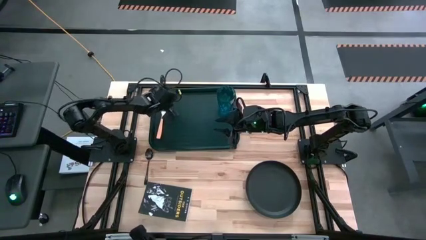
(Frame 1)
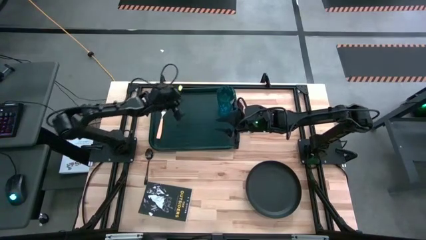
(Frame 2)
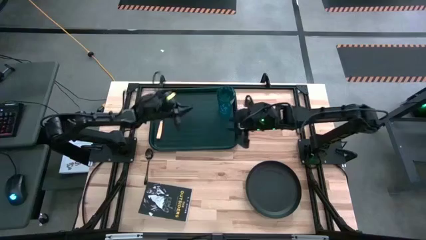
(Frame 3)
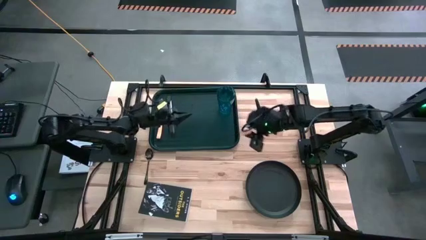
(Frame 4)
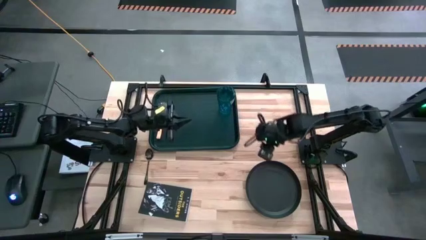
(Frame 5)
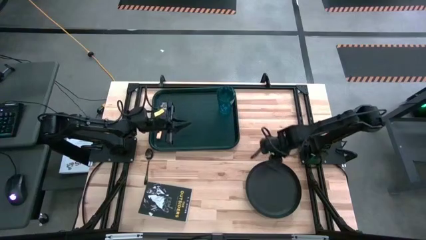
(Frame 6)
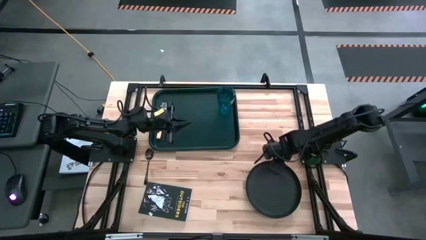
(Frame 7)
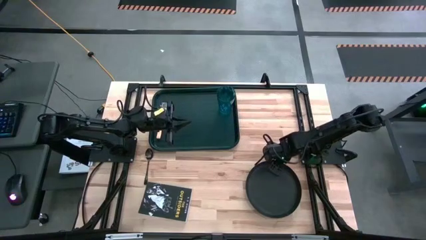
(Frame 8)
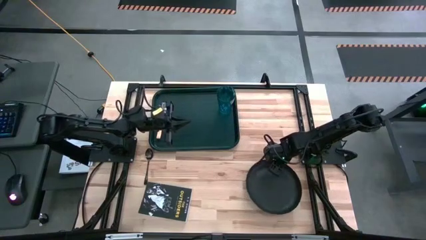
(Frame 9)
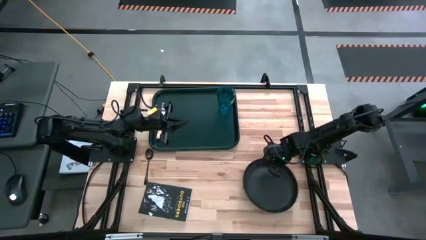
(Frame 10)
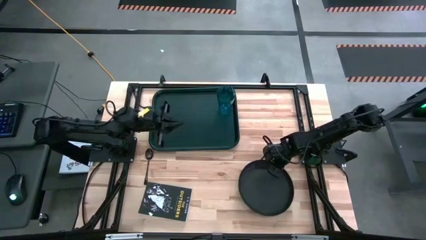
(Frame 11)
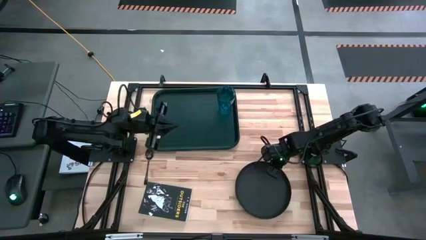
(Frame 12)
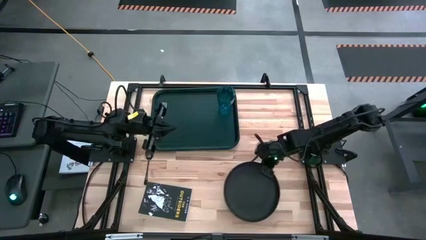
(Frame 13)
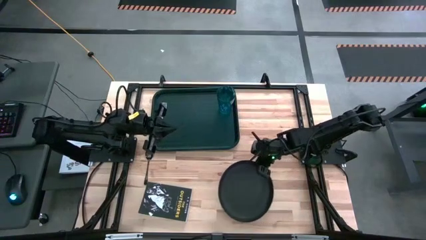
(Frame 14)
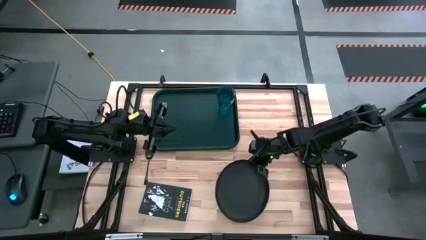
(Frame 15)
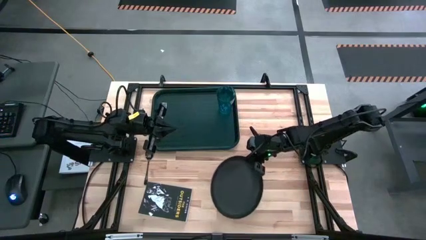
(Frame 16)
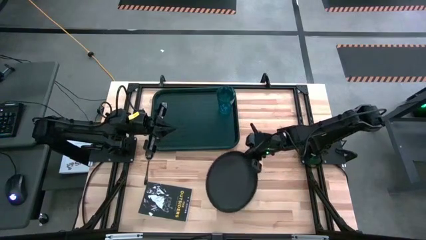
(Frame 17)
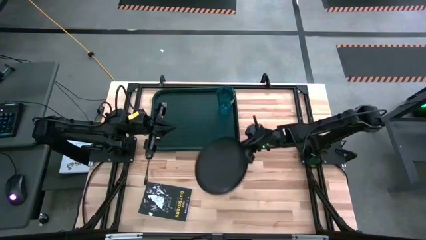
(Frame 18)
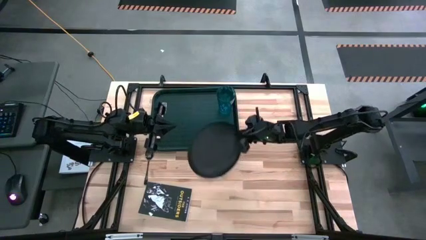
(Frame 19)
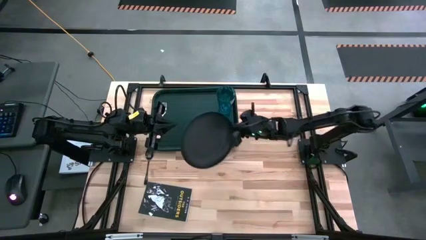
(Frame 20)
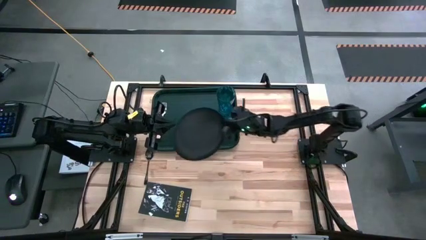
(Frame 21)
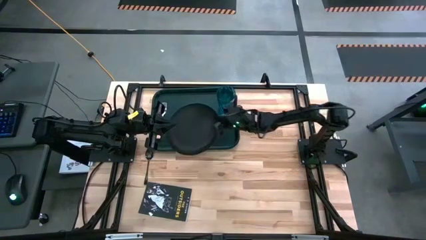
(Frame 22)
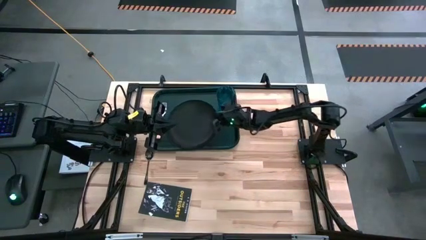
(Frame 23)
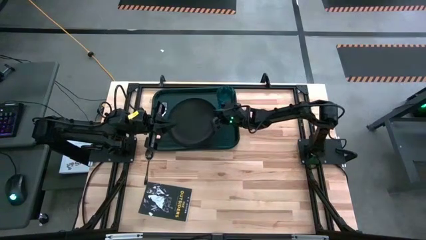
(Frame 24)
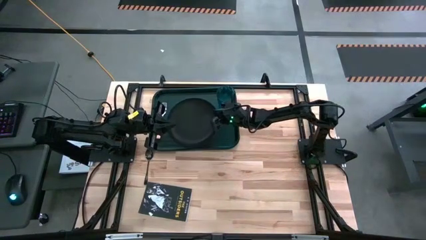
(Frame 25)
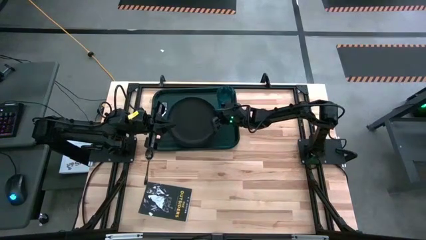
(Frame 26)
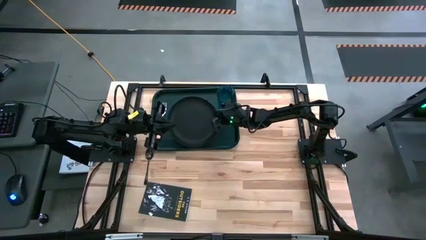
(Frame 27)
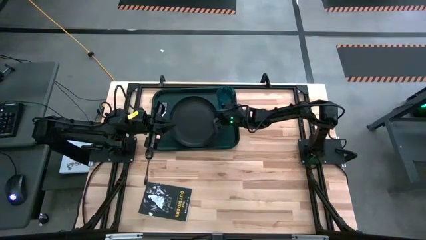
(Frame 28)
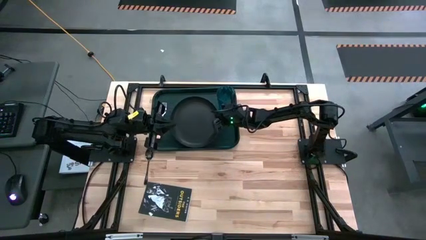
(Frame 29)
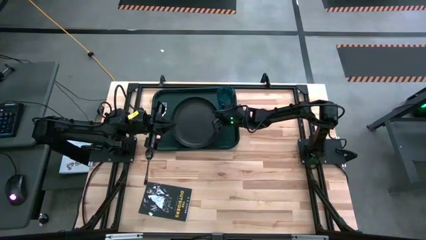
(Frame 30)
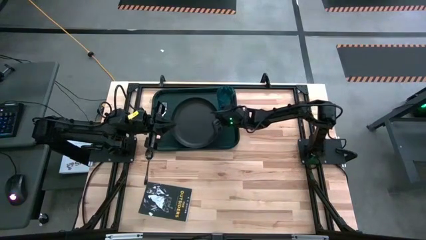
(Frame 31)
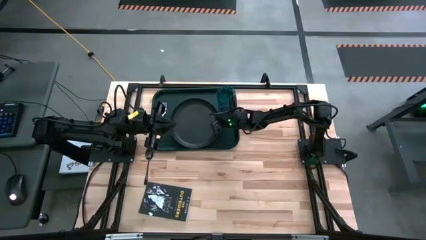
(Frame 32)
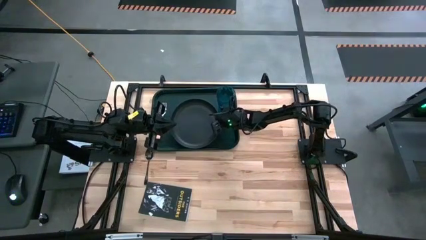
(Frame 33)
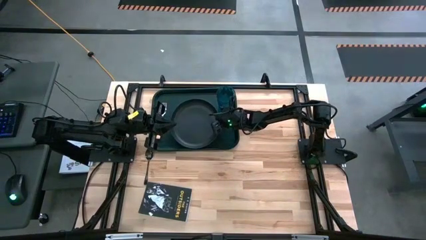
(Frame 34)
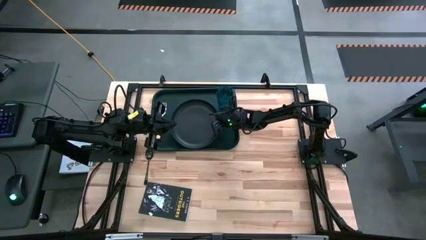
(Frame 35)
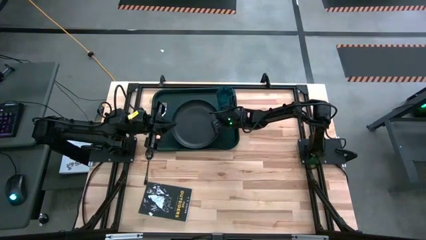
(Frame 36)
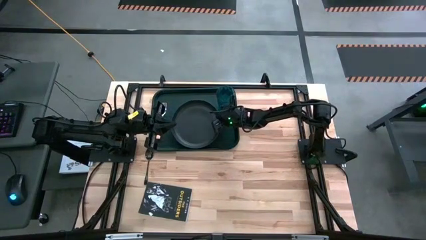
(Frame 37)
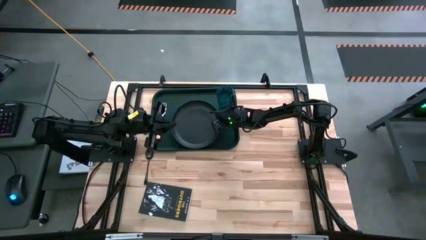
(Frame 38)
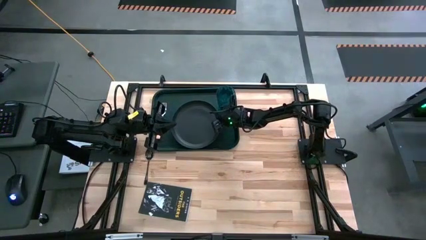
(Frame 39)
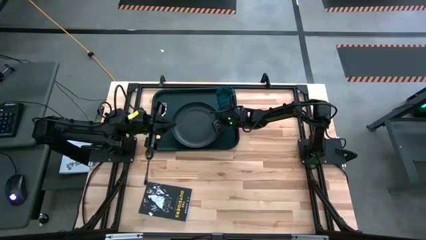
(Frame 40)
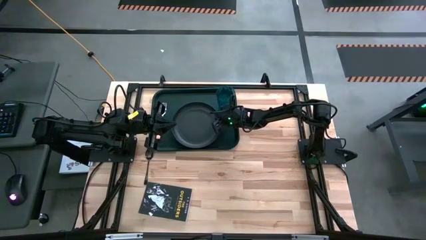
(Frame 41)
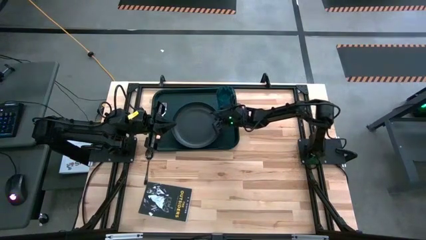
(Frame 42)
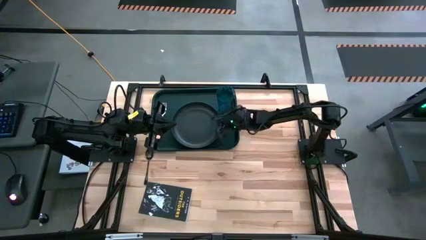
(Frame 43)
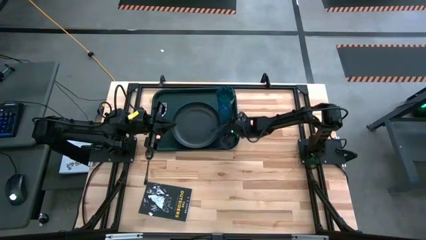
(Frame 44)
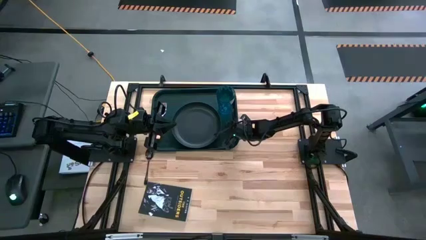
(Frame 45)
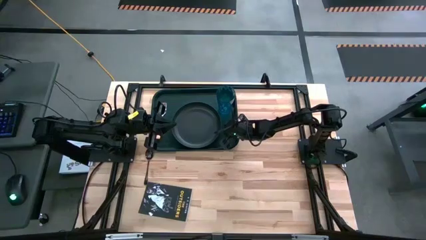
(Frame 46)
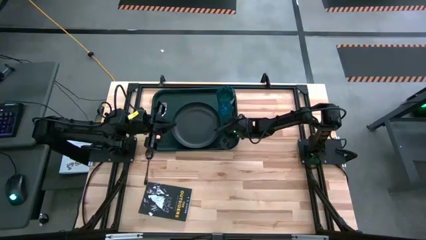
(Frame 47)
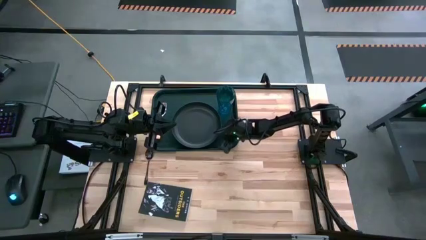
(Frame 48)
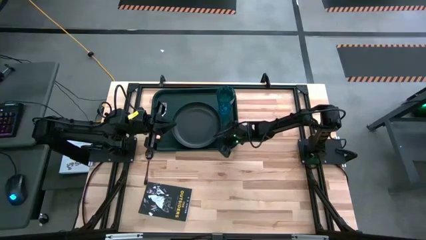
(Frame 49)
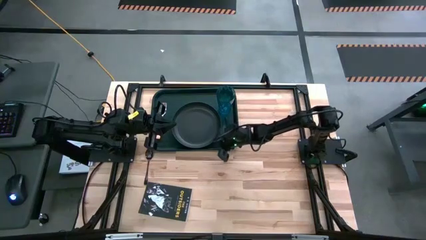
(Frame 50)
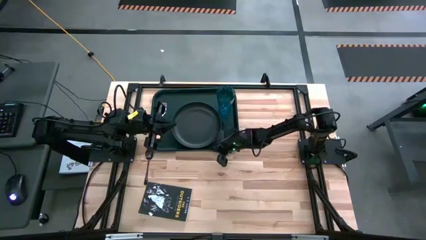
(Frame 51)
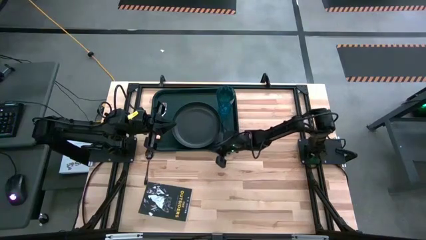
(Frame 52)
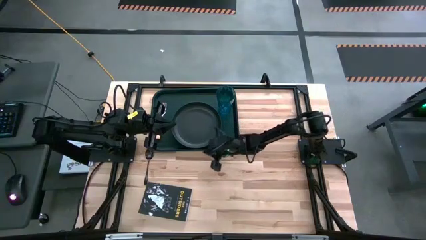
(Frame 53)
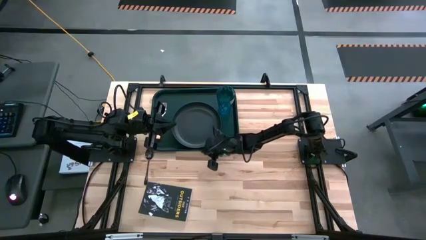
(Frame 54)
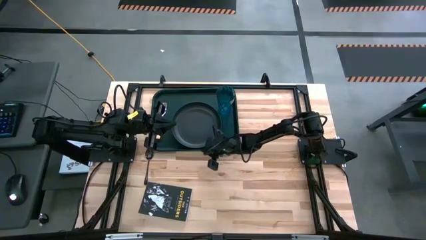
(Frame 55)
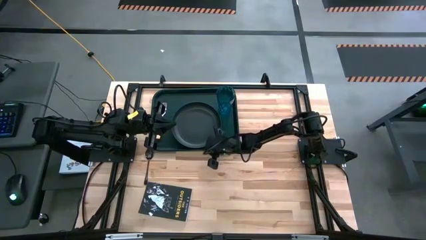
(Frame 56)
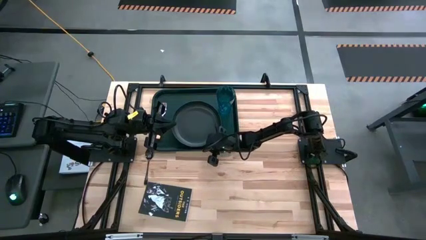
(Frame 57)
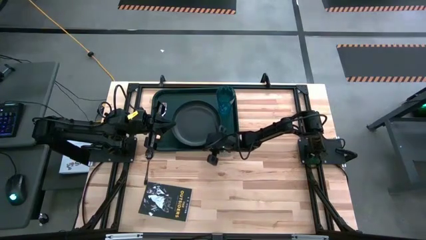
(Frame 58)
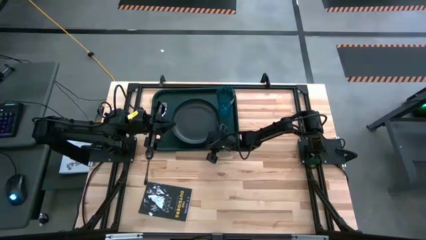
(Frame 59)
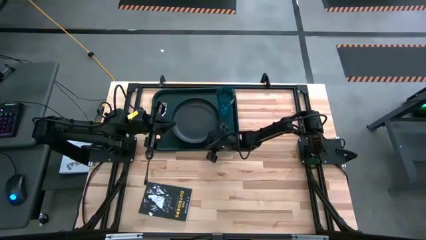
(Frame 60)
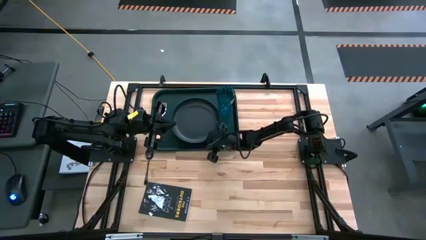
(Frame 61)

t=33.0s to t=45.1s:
Task: Pick and place plate/cup/fork/spoon on tray
Put the black plate in the center of the black tray

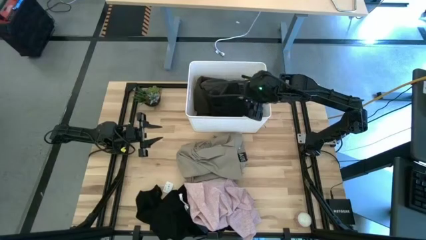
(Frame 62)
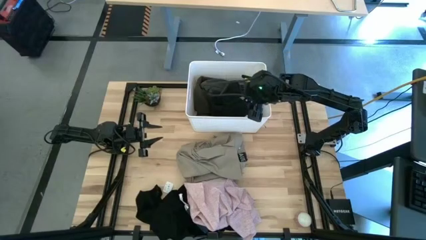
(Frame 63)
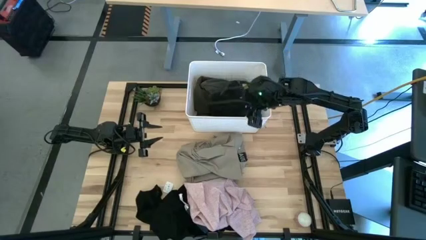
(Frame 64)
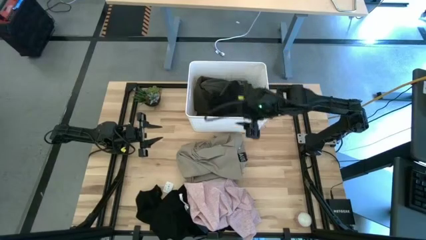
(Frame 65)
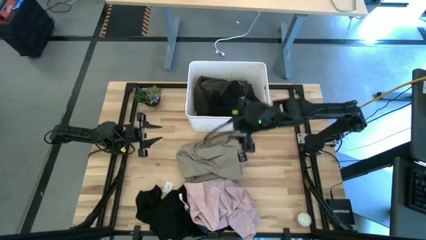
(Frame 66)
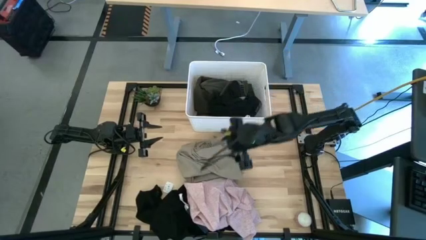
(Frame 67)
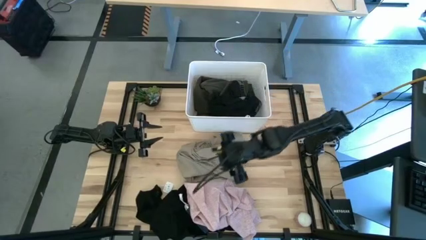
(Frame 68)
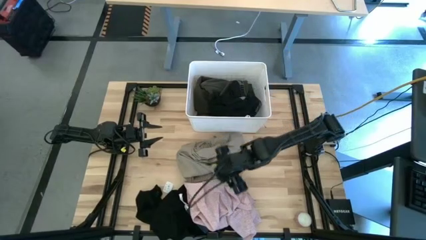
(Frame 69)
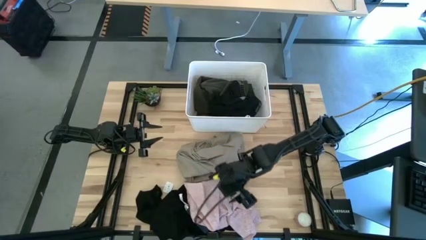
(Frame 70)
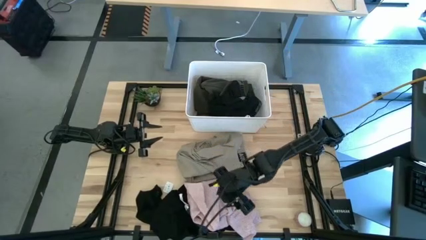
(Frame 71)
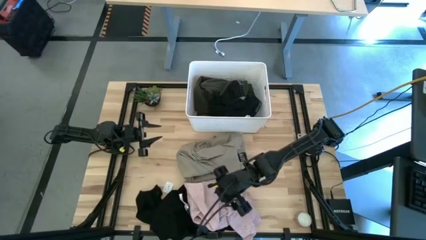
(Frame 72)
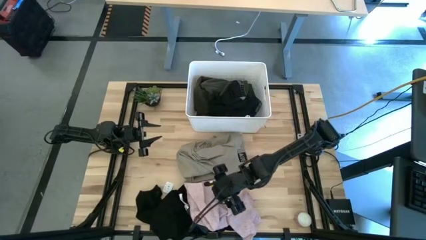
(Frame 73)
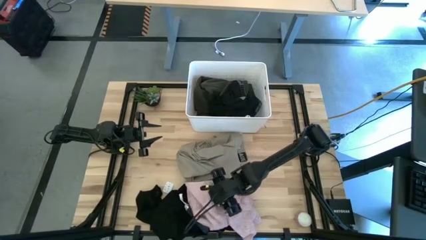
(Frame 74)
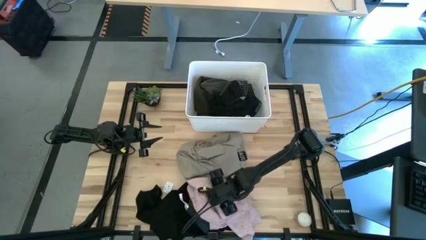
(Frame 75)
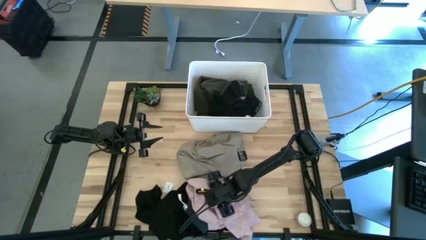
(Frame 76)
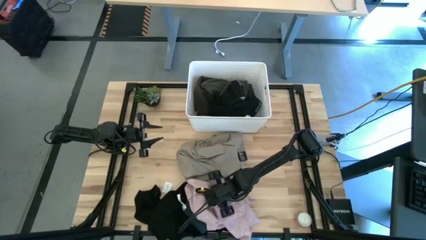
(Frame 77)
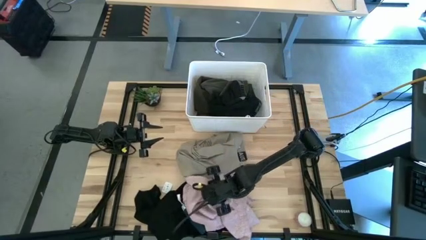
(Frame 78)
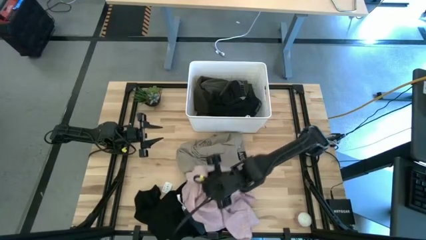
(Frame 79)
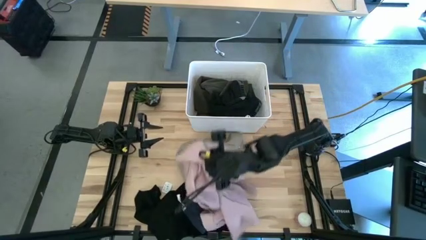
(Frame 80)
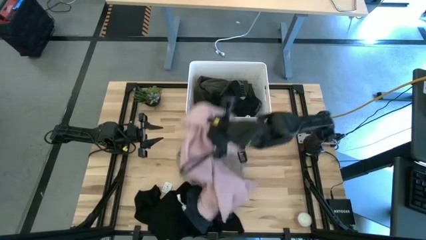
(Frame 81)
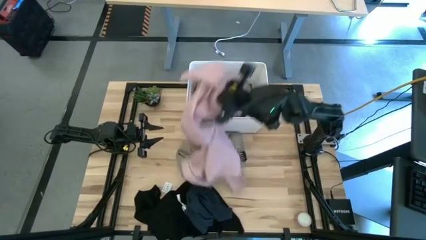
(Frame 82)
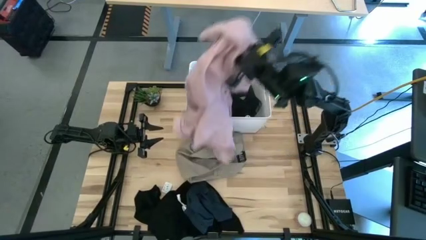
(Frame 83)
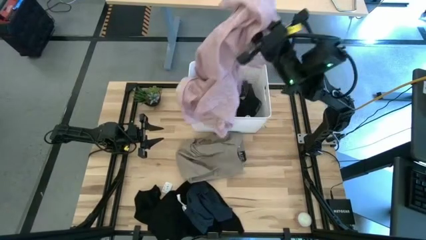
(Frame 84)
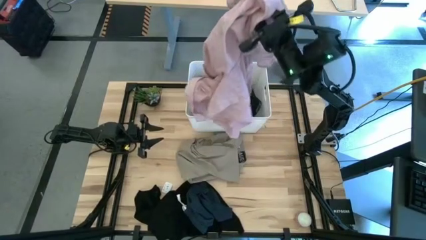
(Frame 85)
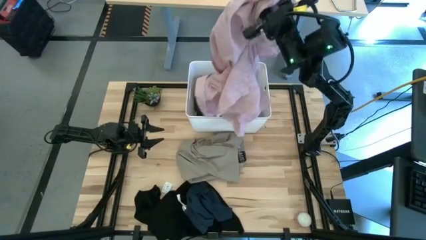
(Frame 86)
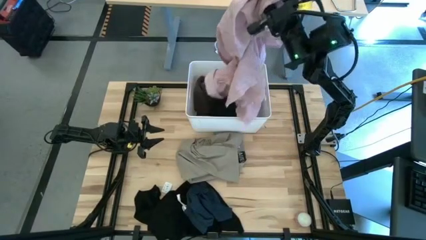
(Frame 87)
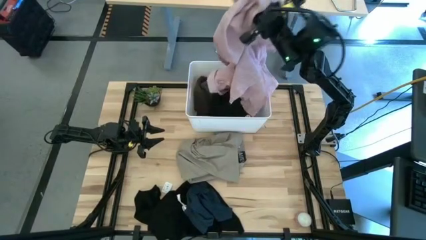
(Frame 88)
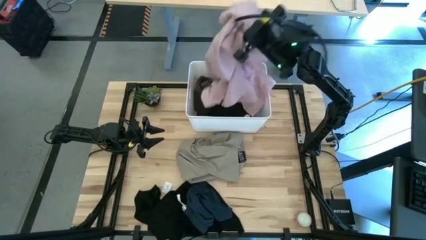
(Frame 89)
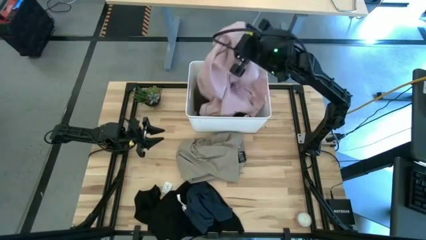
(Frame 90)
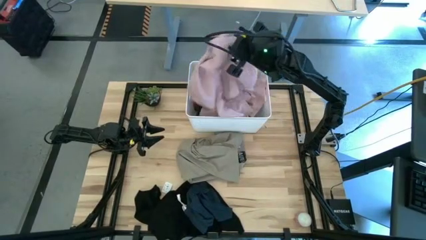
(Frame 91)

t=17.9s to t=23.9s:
Task: Sort clothes
Put the pink polo shirt into the white laundry bin
